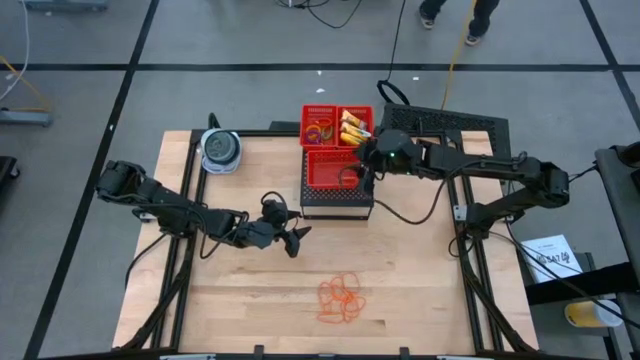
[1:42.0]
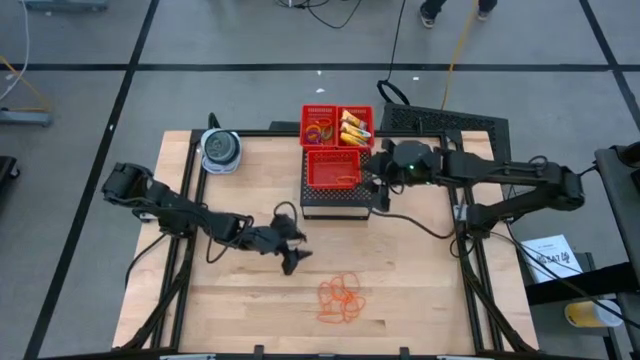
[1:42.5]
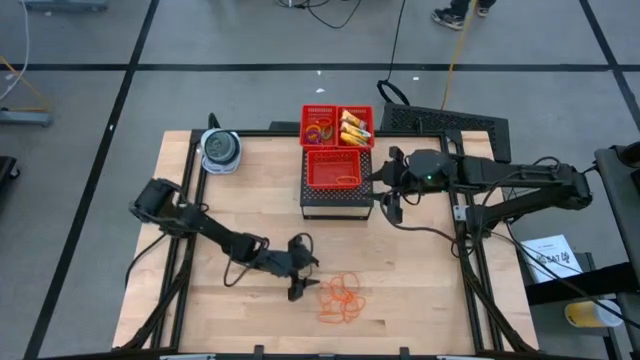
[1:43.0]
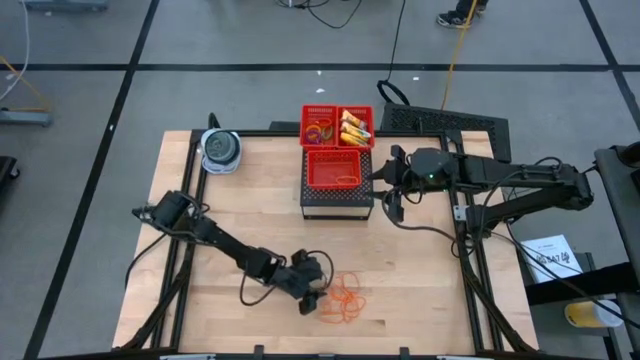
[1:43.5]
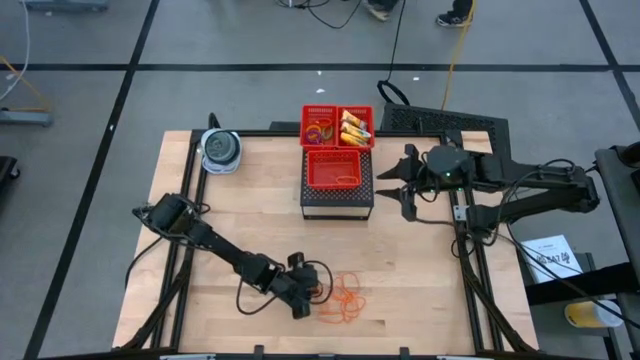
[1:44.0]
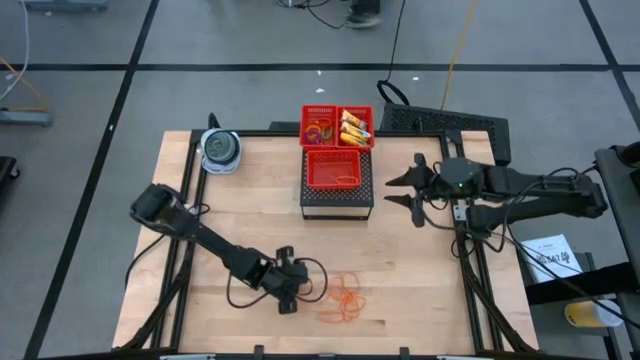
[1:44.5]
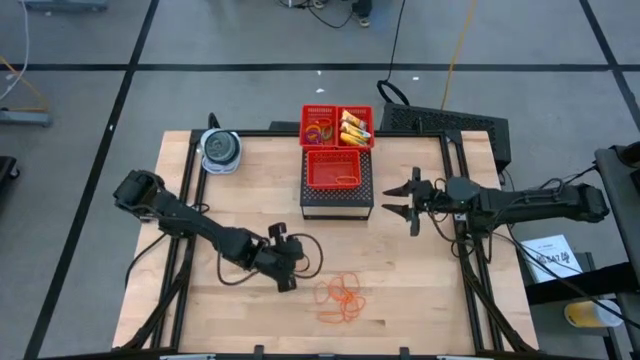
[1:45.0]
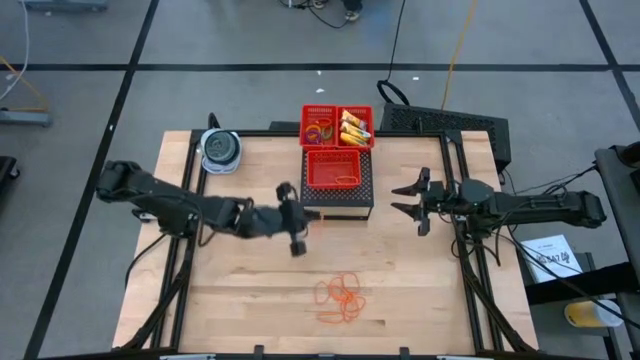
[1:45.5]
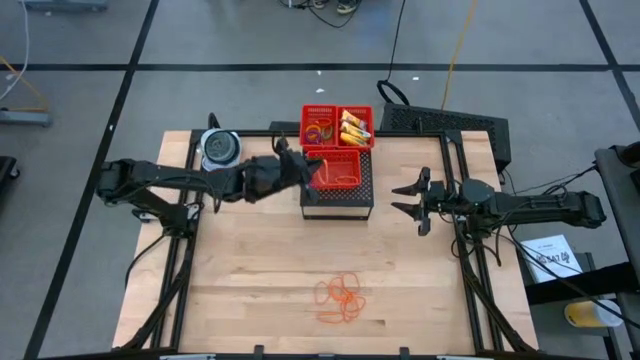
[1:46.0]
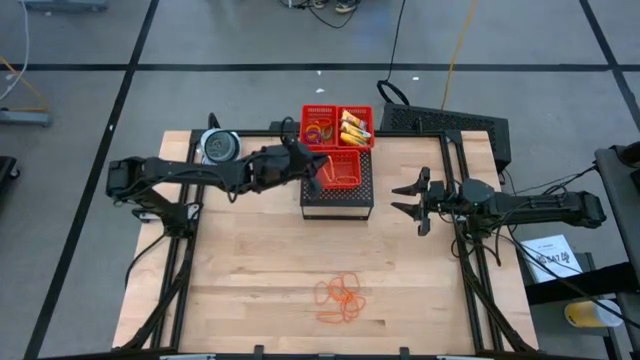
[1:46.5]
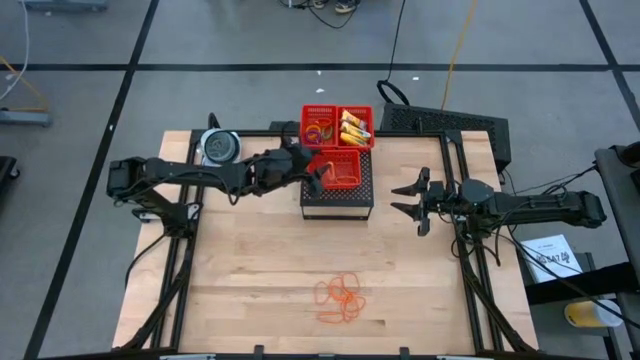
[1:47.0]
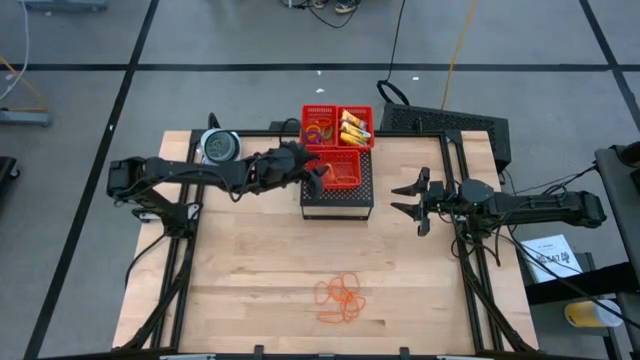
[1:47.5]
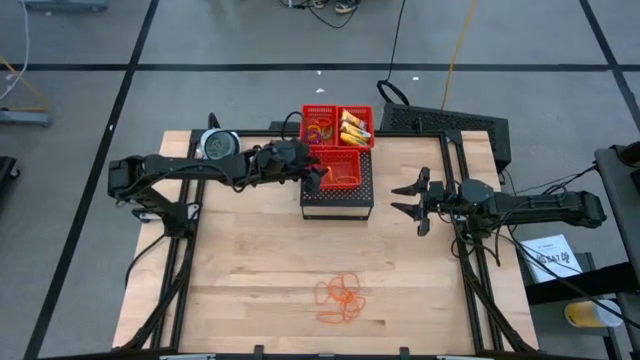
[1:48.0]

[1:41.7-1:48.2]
Task: Pick & Place Office Desk Supplies
Put the orange rubber band in the bottom red bin on the shelf

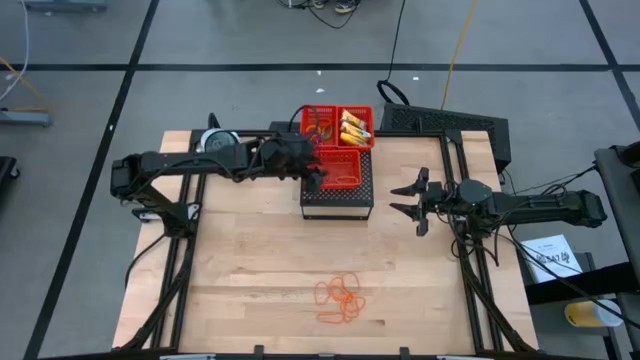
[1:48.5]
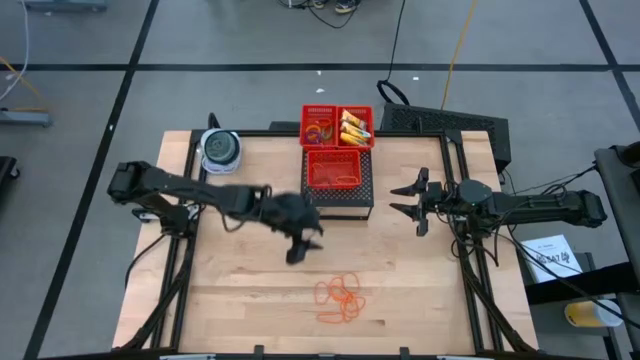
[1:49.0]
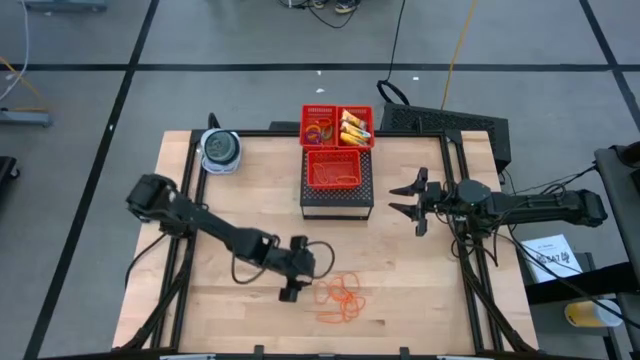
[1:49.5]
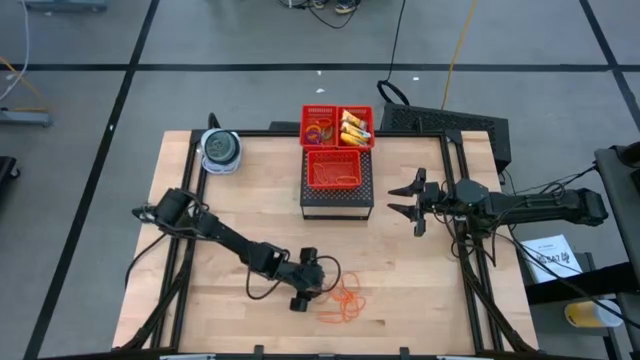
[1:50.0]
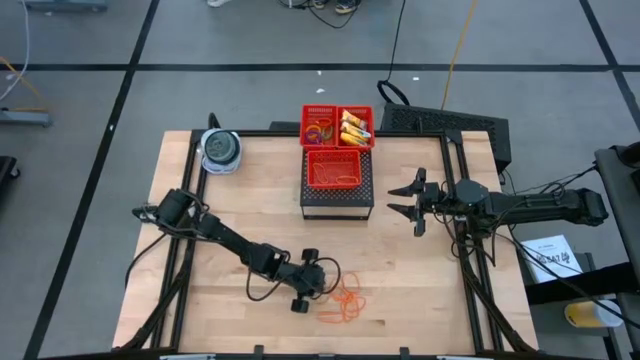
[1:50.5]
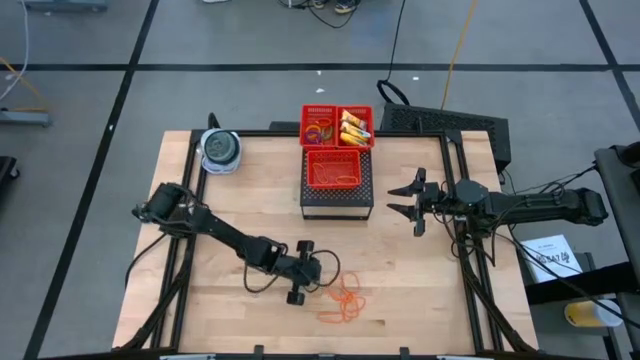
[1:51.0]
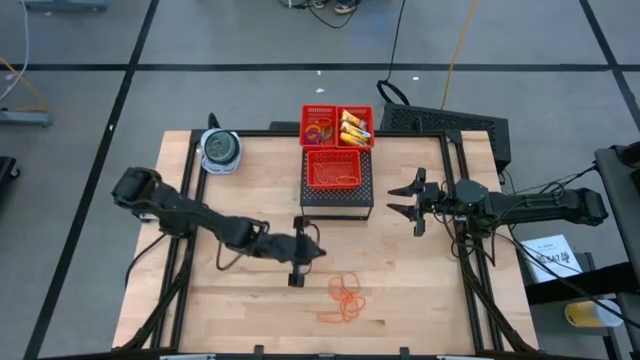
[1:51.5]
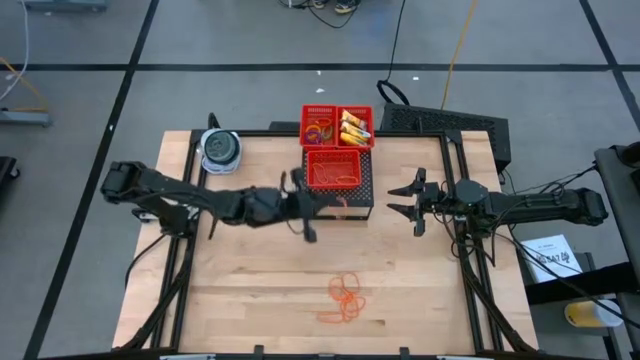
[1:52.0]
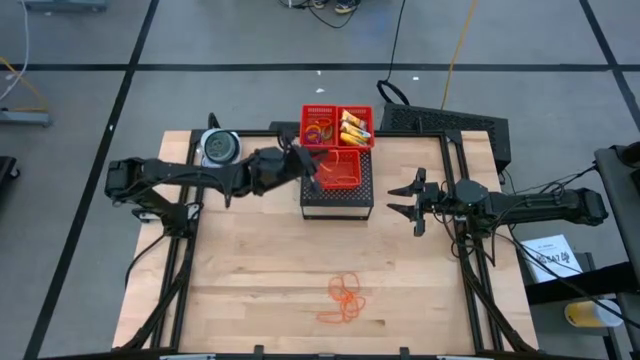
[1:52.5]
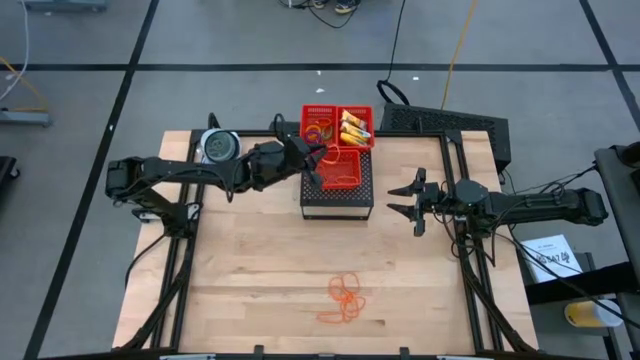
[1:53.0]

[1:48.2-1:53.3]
Put the orange rubber band in the bottom red bin on the shelf

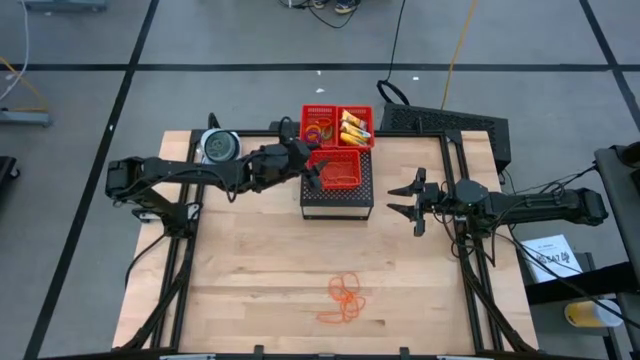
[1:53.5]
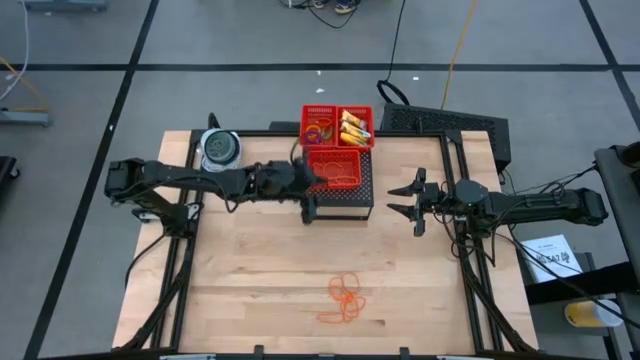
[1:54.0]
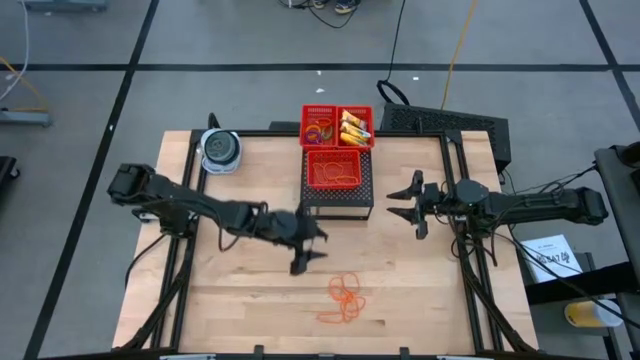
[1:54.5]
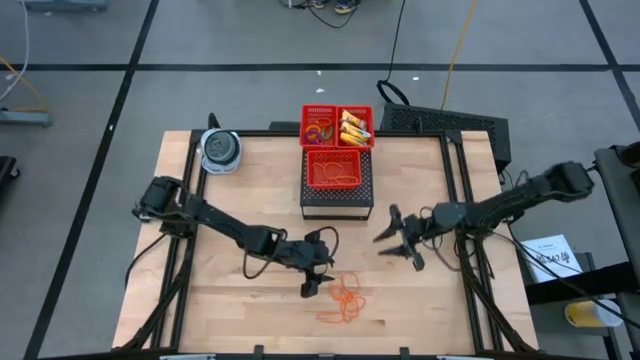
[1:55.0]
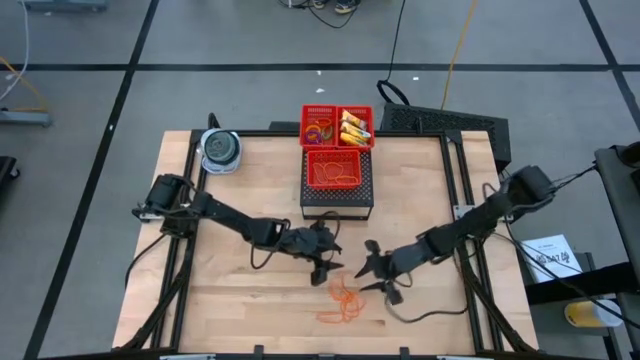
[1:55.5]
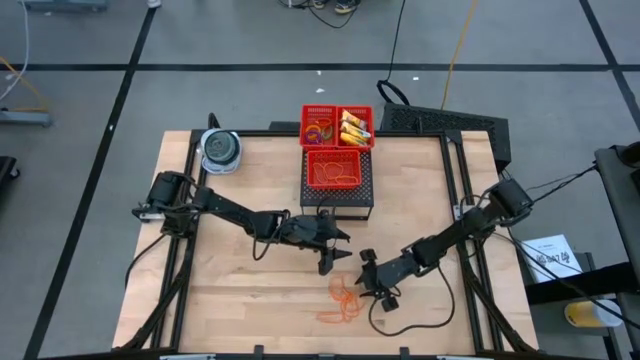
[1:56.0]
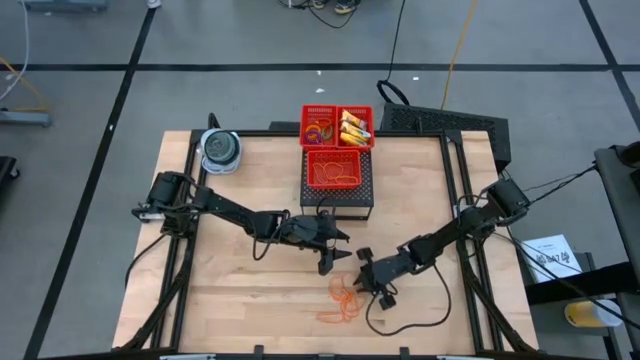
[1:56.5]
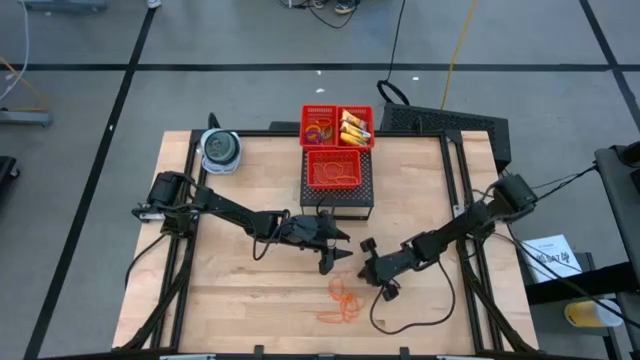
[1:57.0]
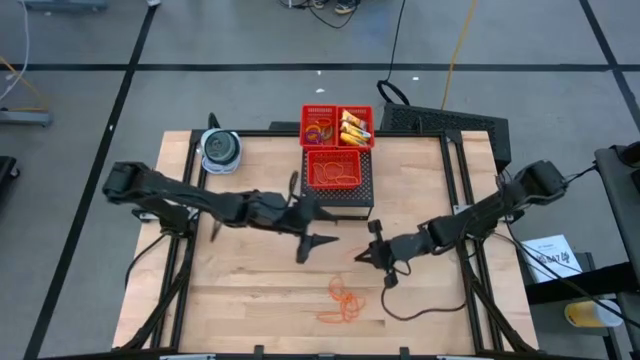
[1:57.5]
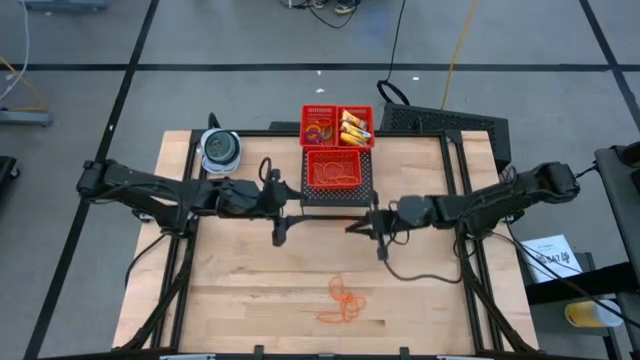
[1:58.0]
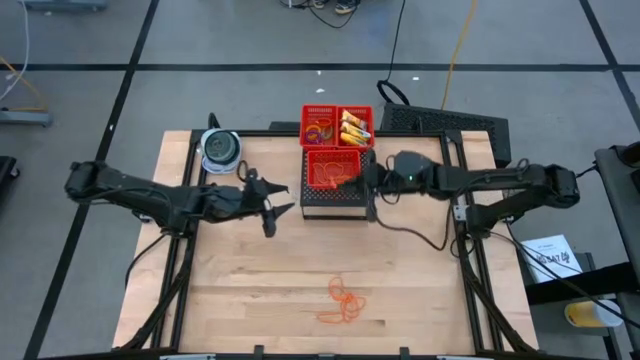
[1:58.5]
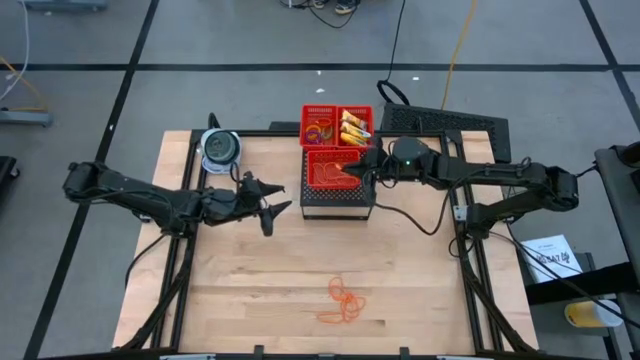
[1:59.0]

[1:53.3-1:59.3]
Put the orange rubber band in the bottom red bin on the shelf

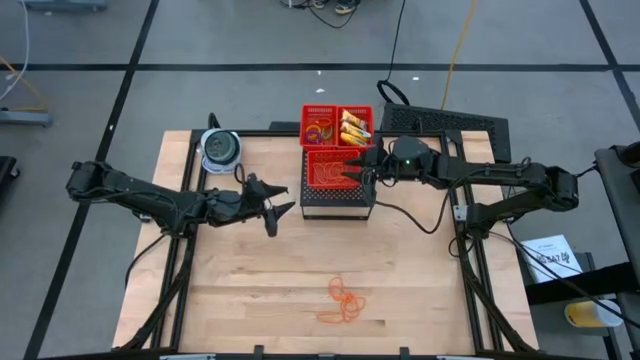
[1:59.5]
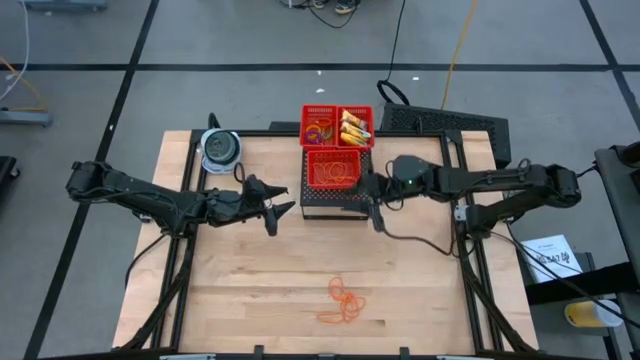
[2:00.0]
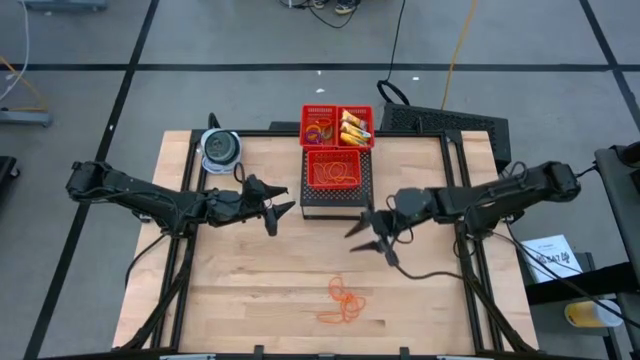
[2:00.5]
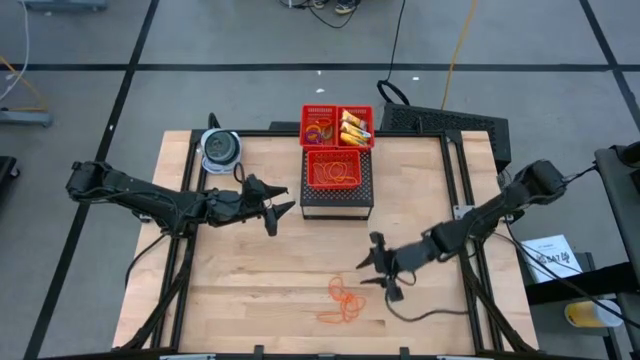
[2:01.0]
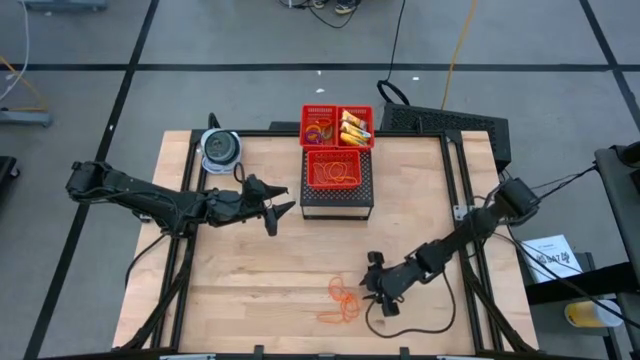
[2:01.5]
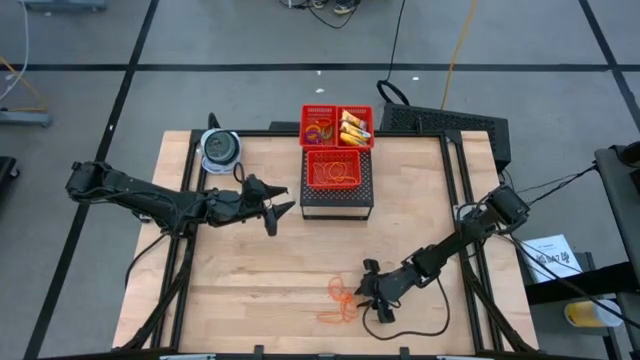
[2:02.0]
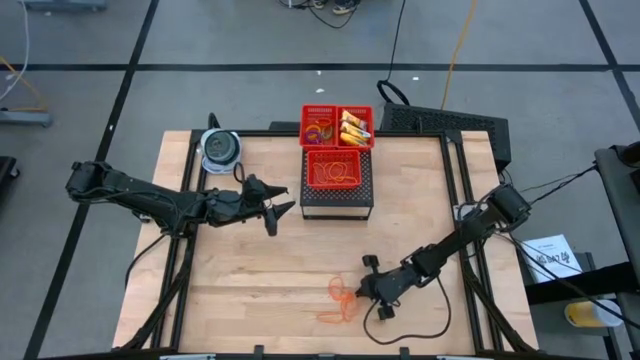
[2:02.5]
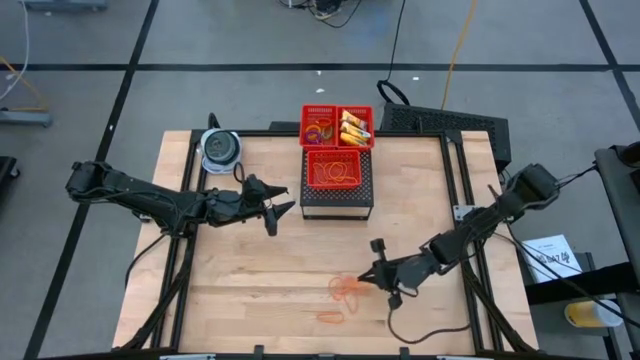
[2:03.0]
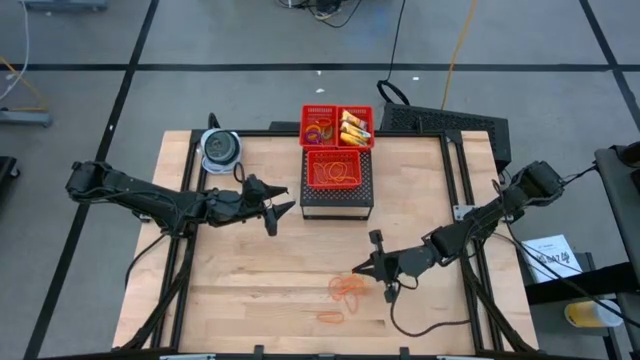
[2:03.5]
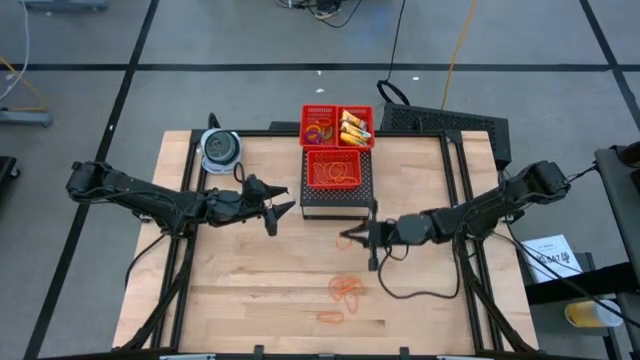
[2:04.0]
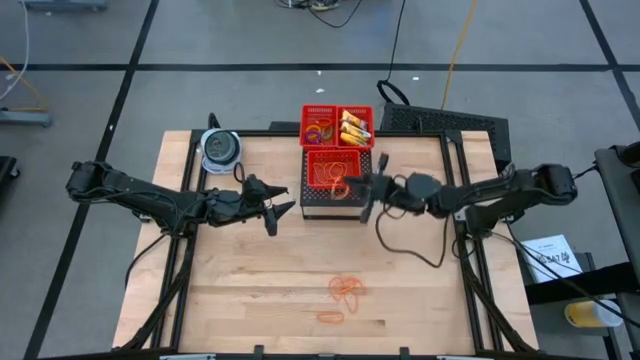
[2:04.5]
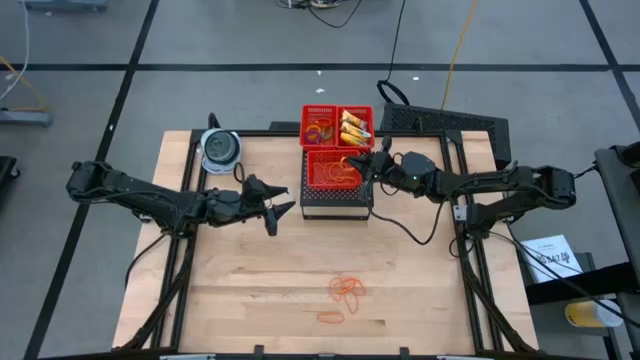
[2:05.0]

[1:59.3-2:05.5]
Put the orange rubber band in the bottom red bin on the shelf
